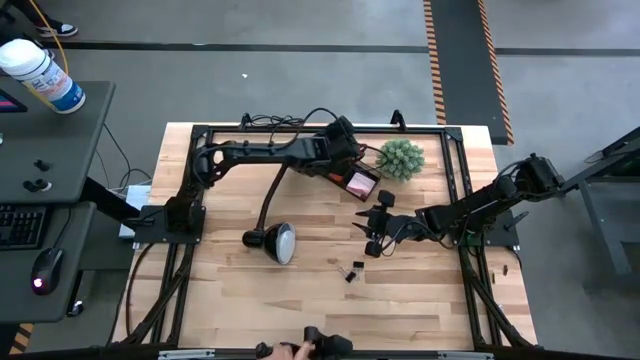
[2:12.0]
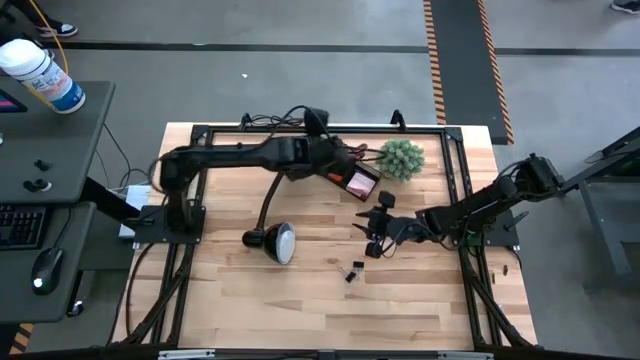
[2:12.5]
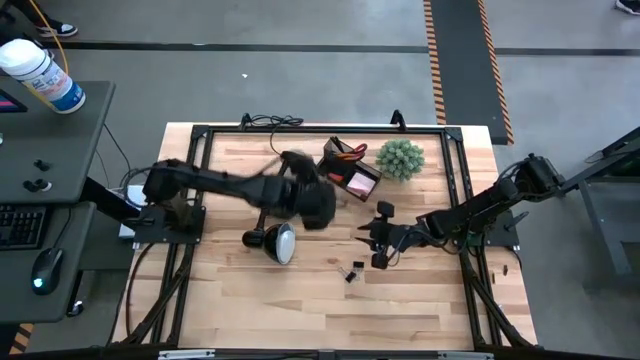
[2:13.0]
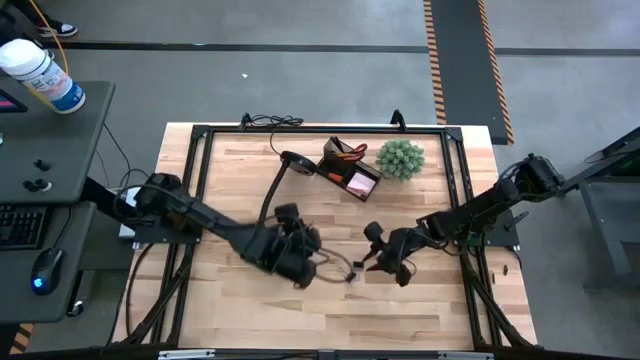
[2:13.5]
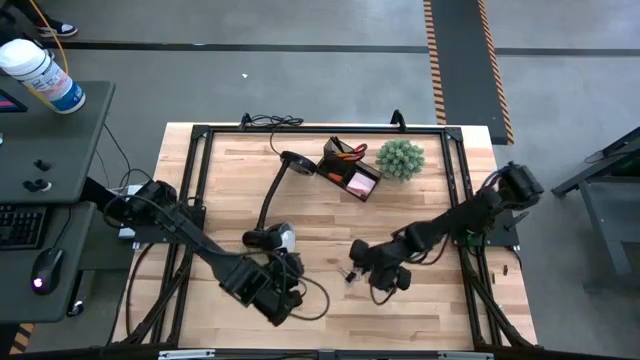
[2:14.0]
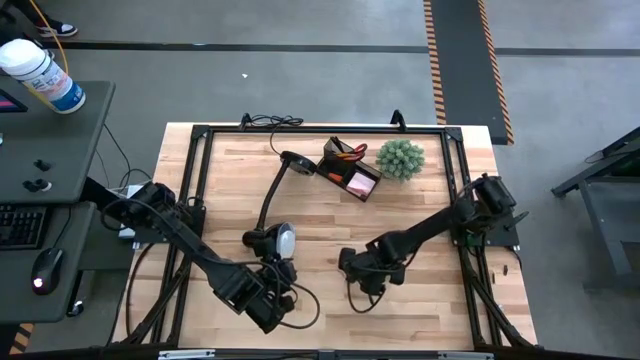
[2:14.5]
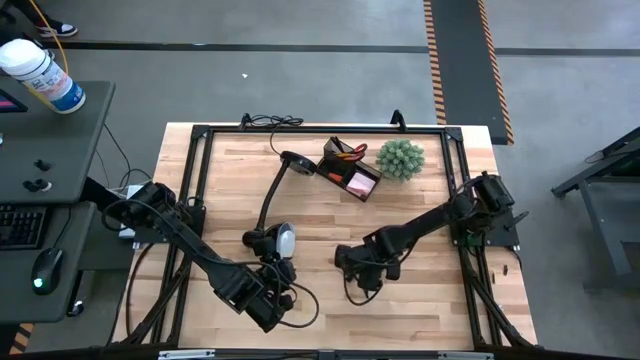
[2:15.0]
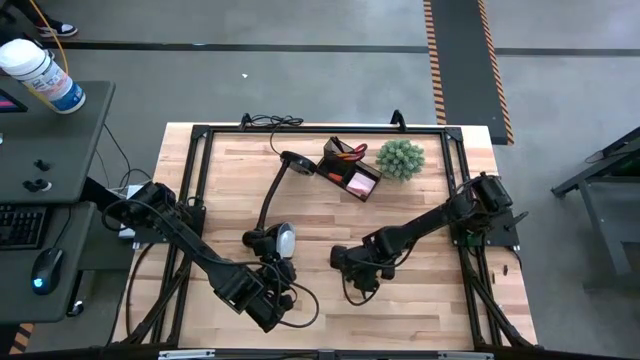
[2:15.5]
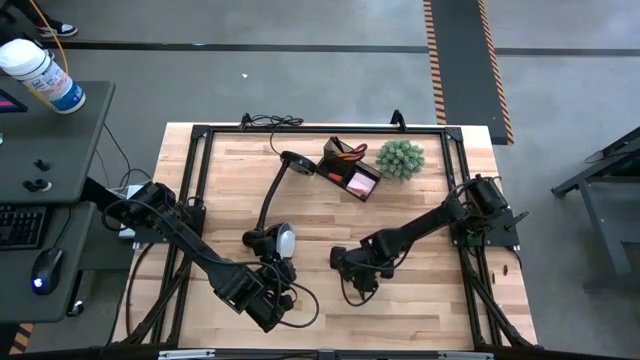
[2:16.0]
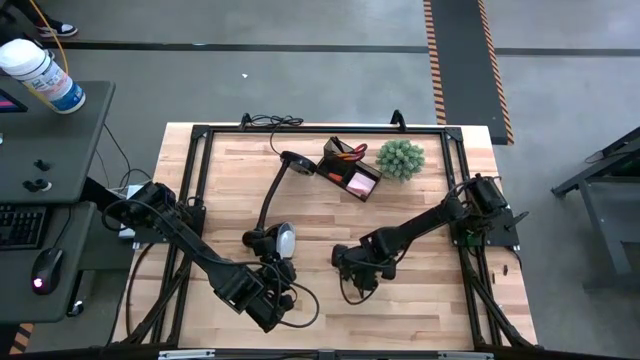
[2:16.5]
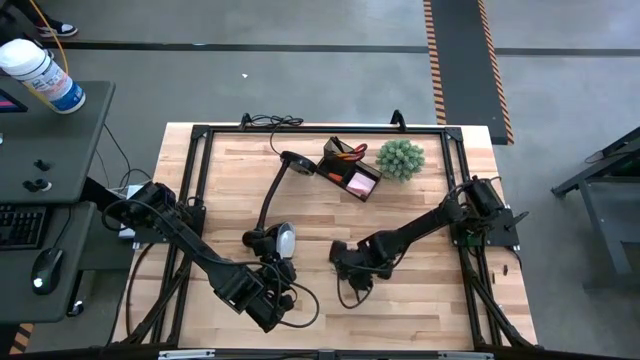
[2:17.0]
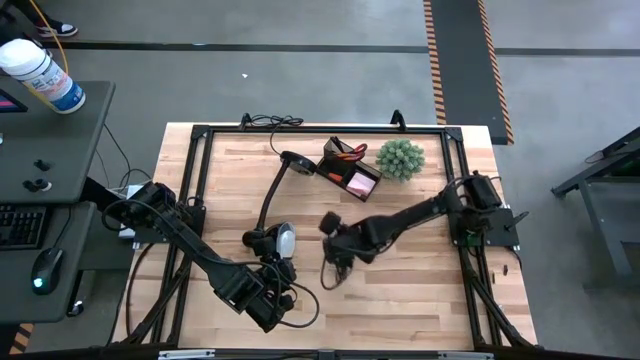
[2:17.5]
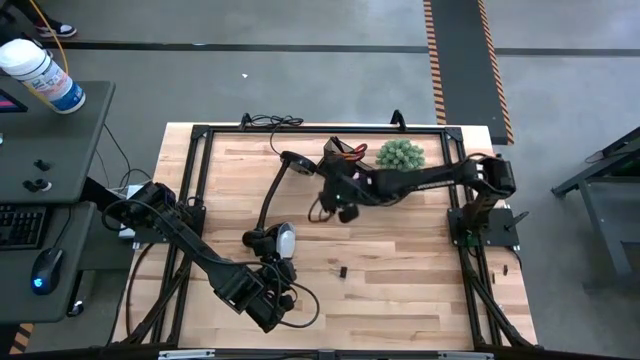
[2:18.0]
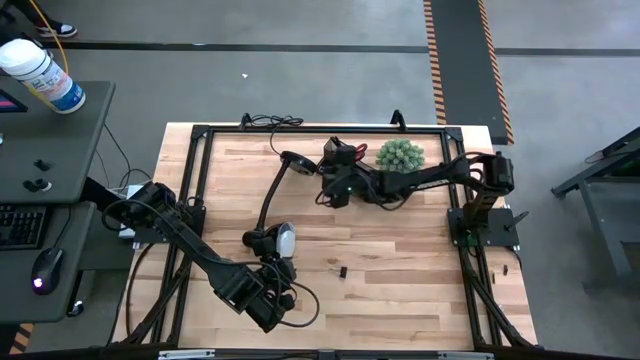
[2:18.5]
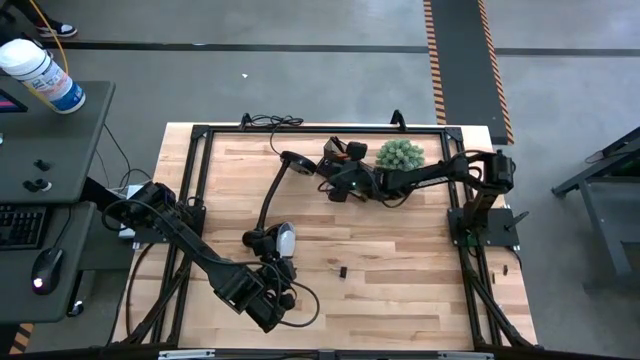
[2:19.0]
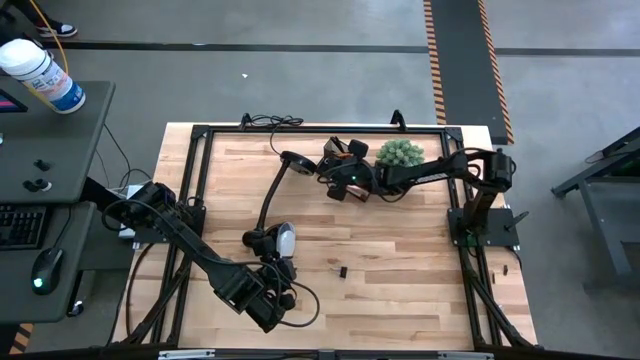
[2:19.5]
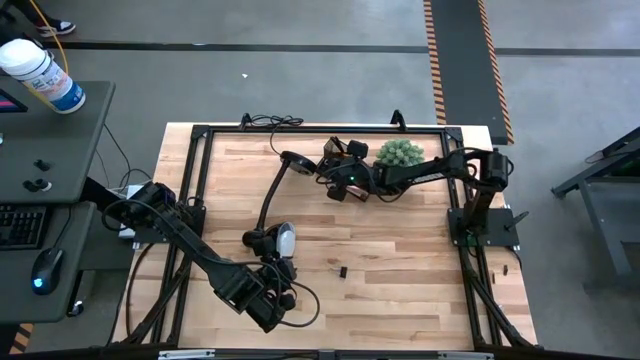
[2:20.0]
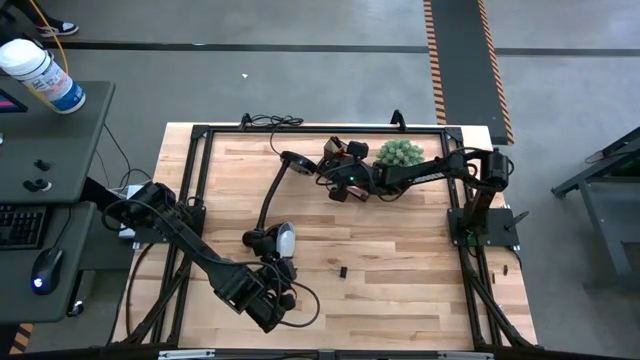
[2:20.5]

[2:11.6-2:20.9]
Task: Pick and place office supplies into organizer
Put the top black binder clip into the desk organizer

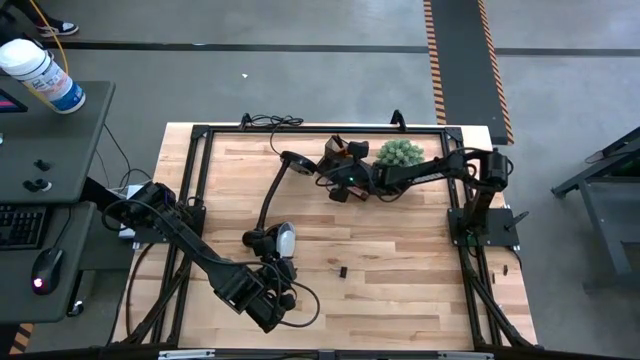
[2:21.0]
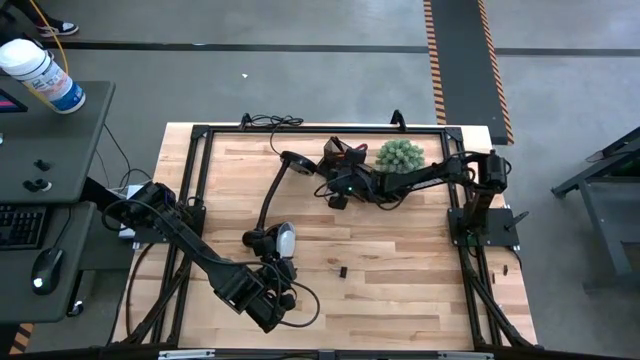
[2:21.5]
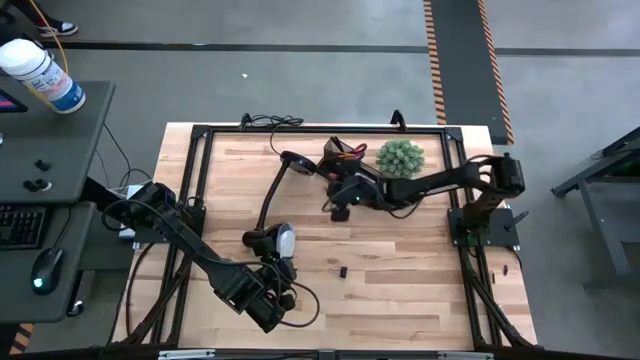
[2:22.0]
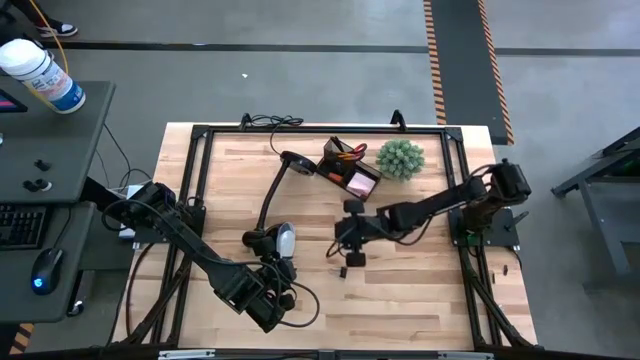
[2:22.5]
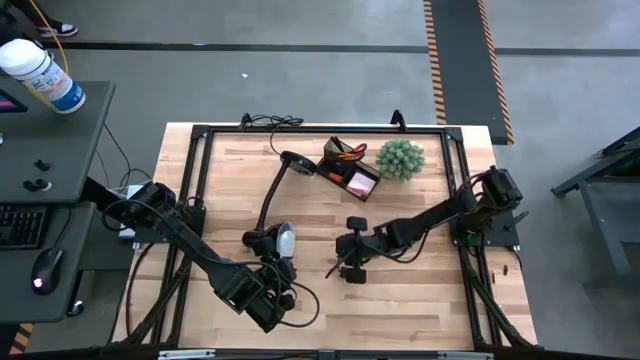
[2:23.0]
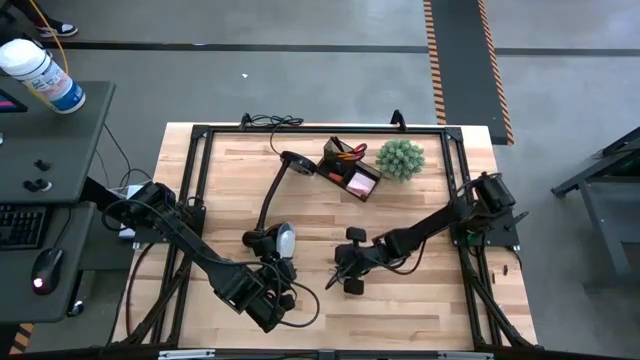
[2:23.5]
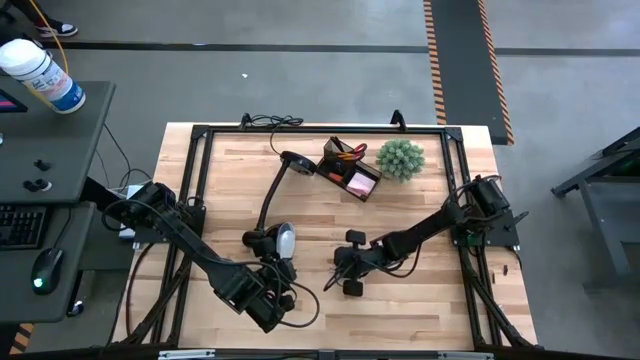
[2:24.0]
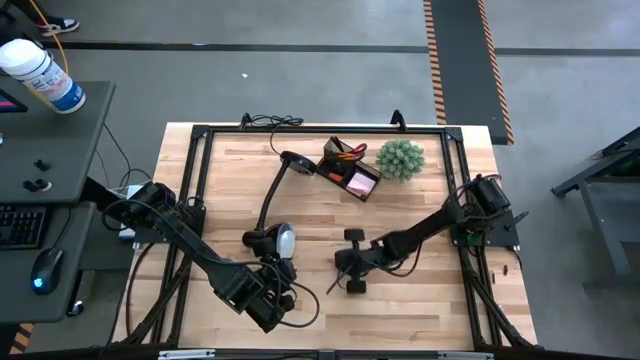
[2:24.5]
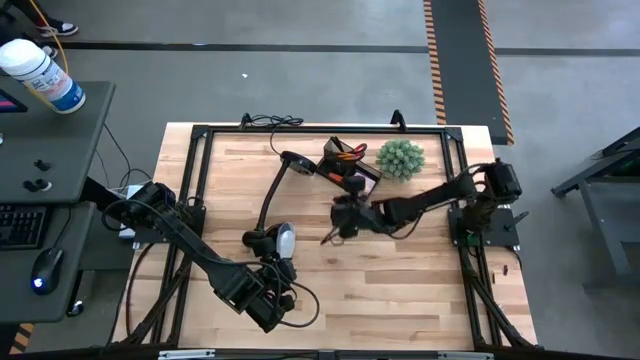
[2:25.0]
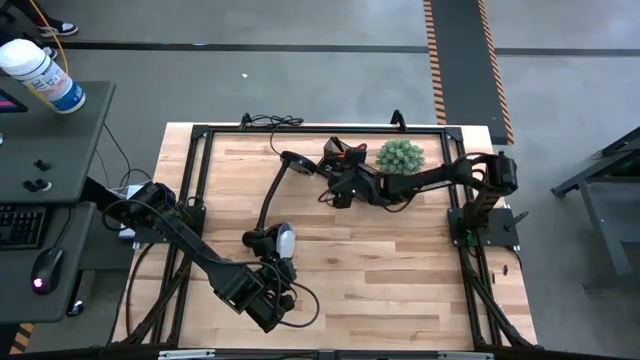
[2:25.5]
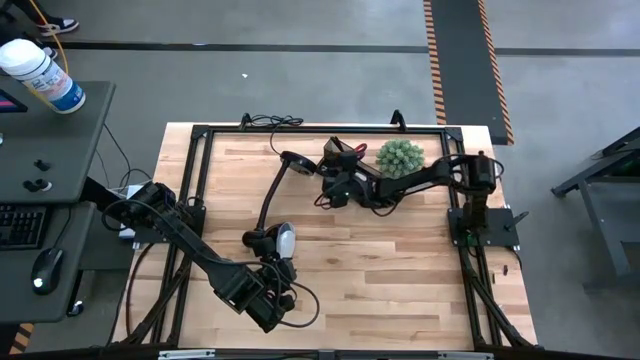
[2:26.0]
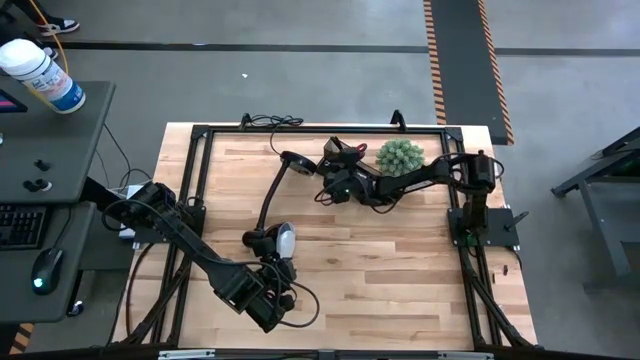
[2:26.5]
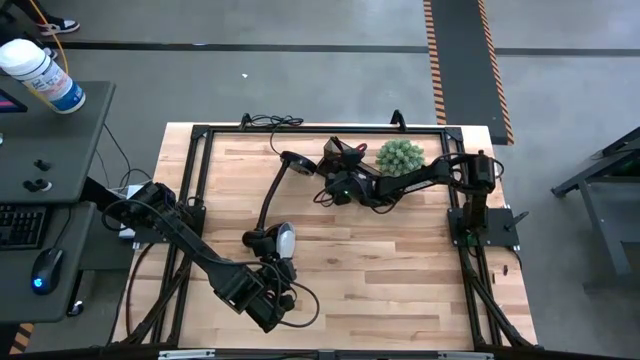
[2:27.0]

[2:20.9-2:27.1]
Put the black binder clip into the desk organizer

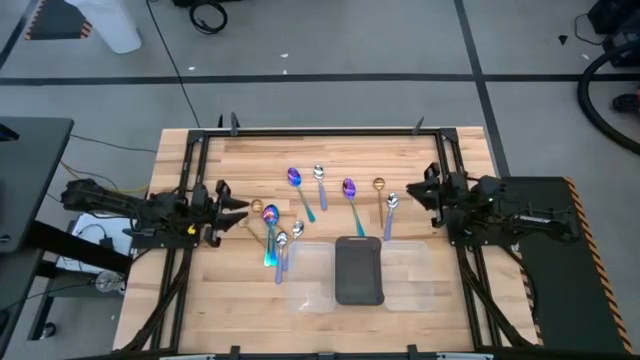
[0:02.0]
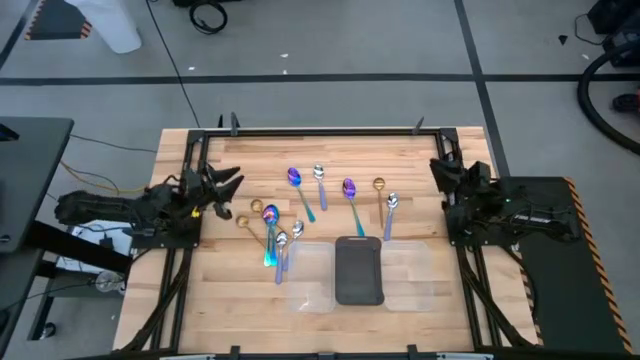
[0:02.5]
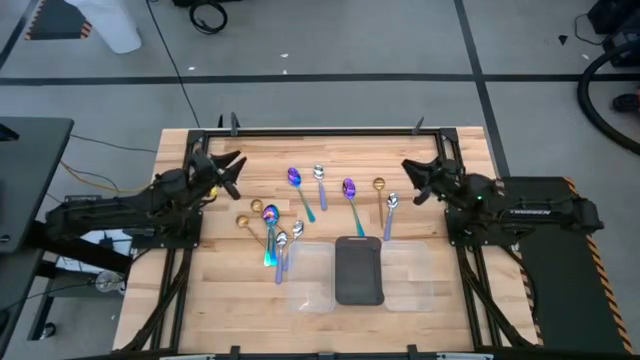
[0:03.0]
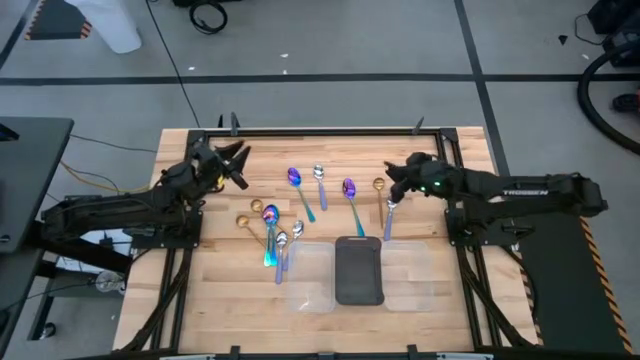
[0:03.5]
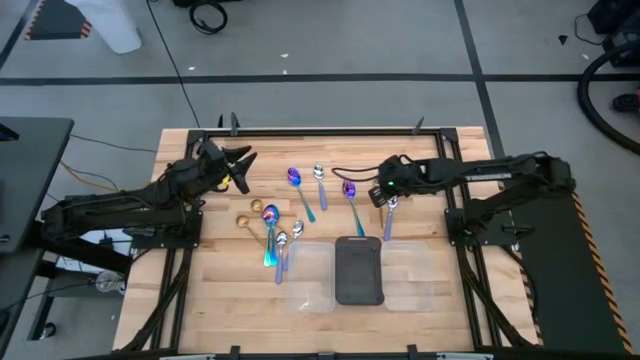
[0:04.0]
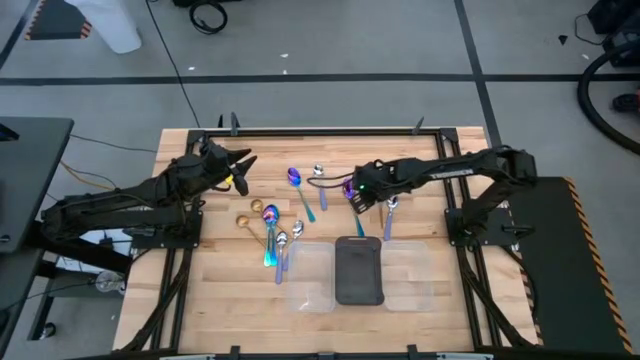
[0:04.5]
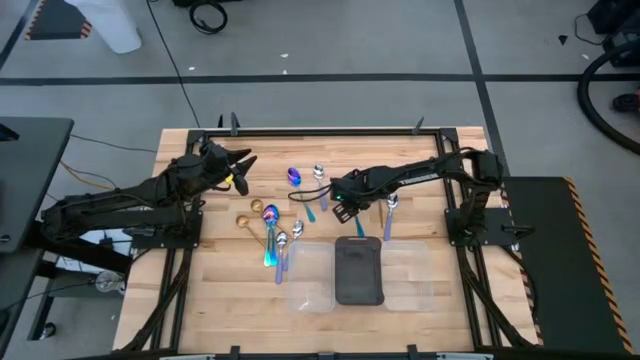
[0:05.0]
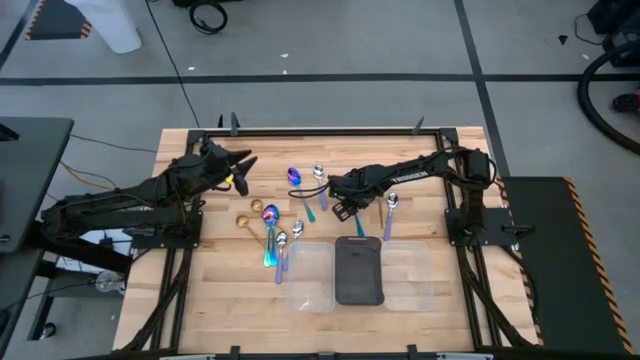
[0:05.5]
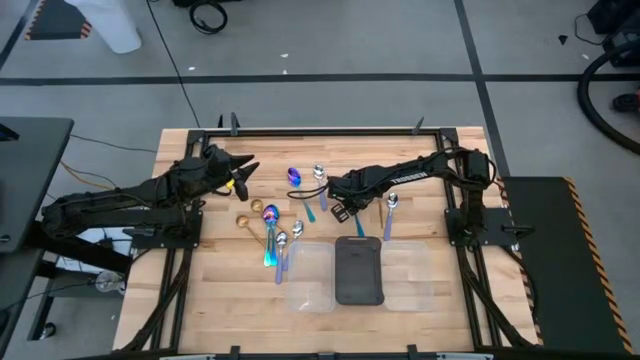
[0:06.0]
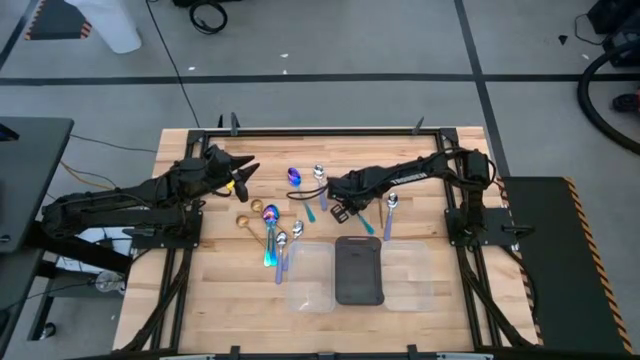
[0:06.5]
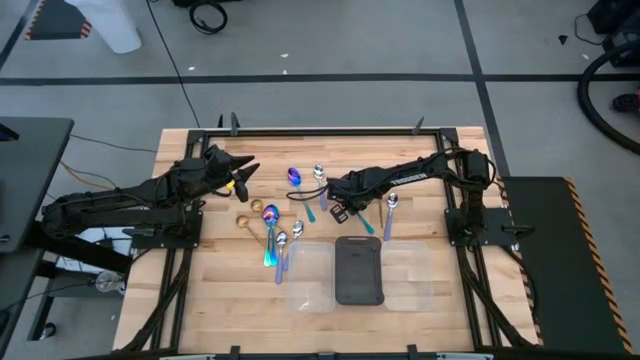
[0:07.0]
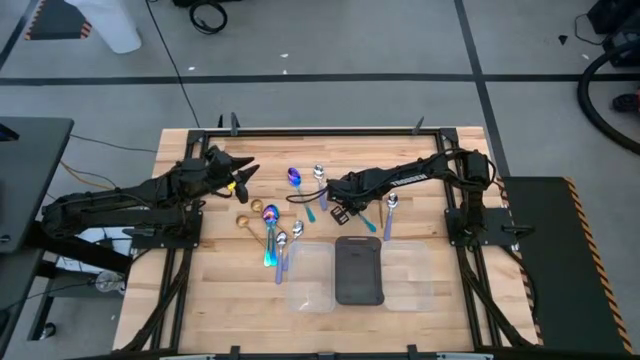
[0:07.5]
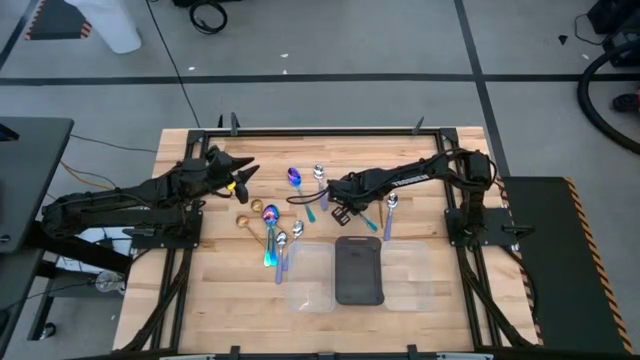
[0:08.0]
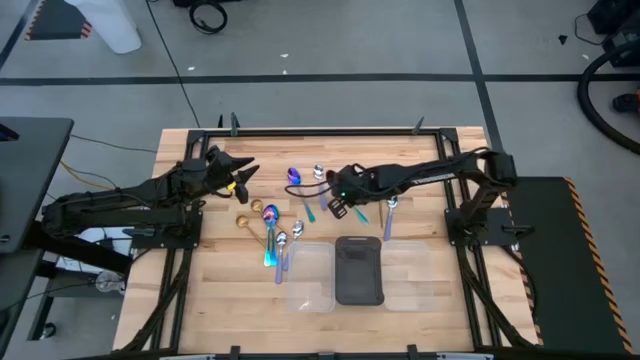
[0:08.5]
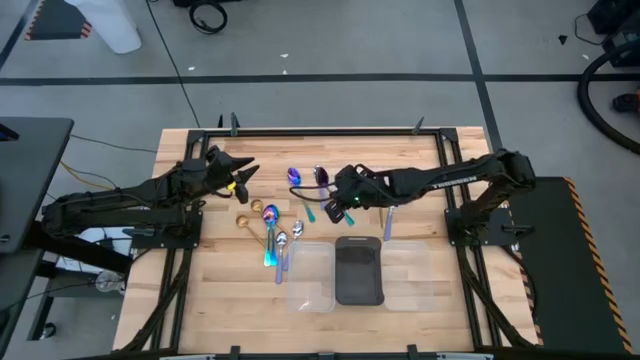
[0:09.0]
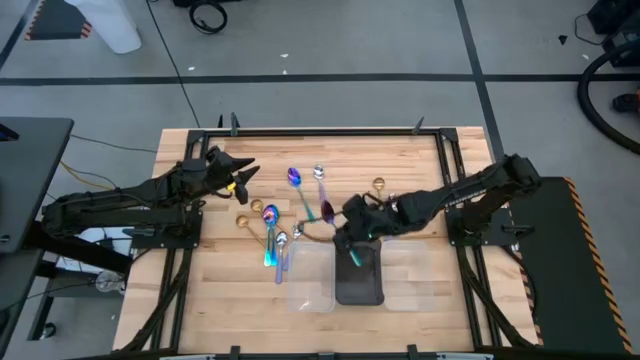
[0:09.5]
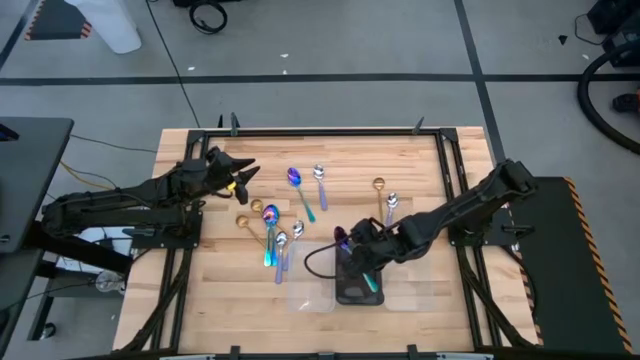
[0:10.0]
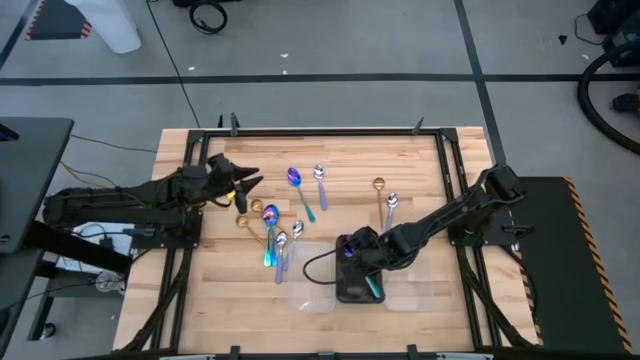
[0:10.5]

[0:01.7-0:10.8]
Task: Sort silverware by color (type)
Put the blue spoon into the black bin
